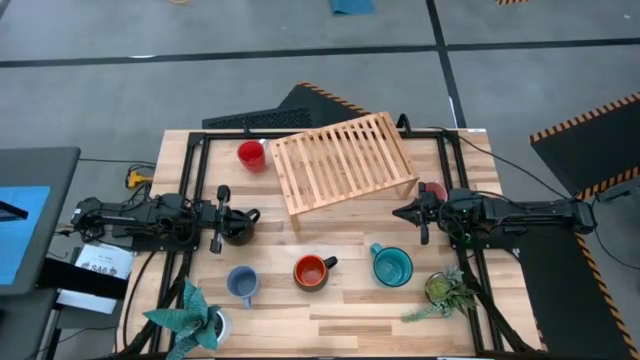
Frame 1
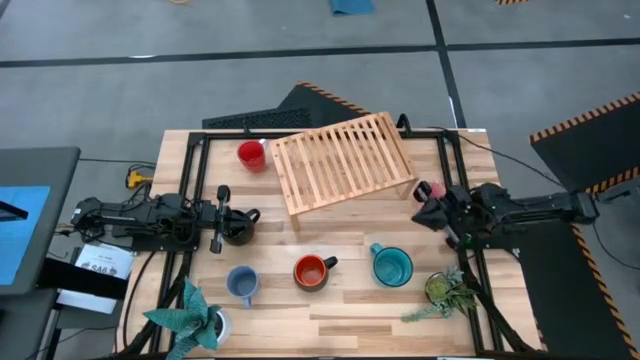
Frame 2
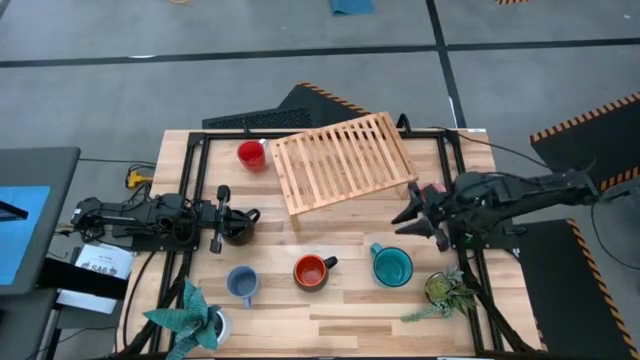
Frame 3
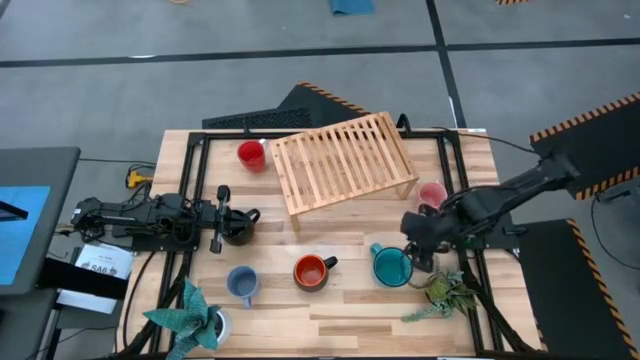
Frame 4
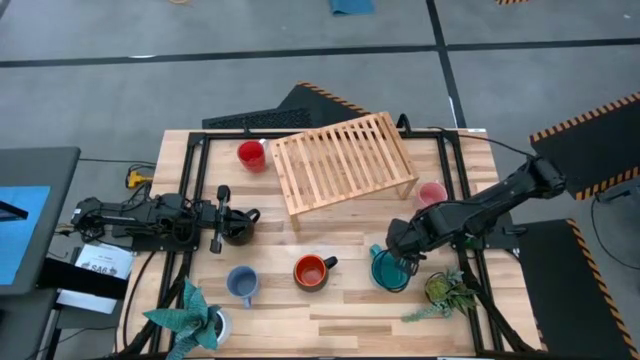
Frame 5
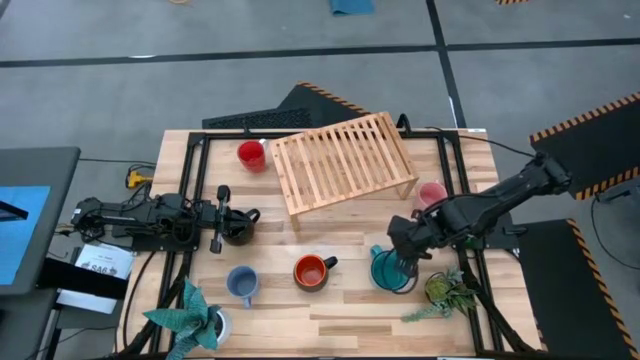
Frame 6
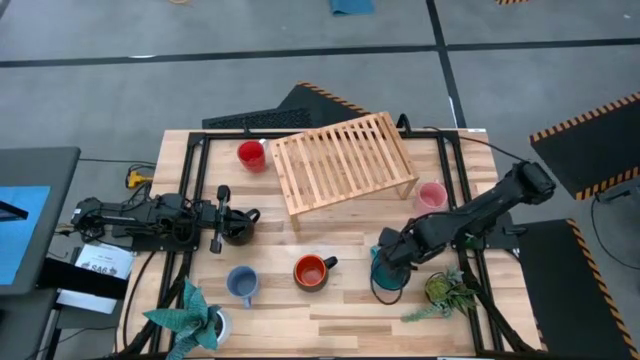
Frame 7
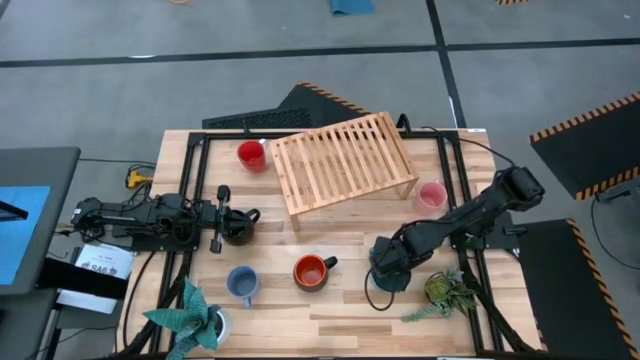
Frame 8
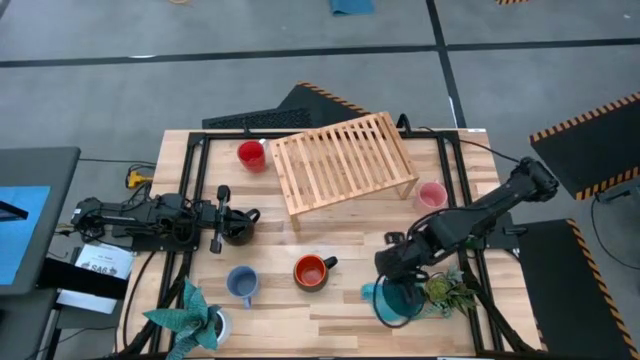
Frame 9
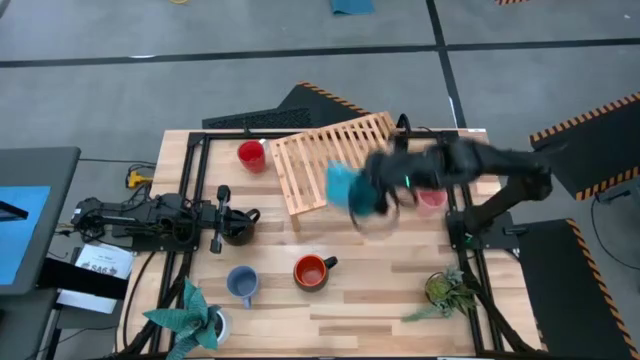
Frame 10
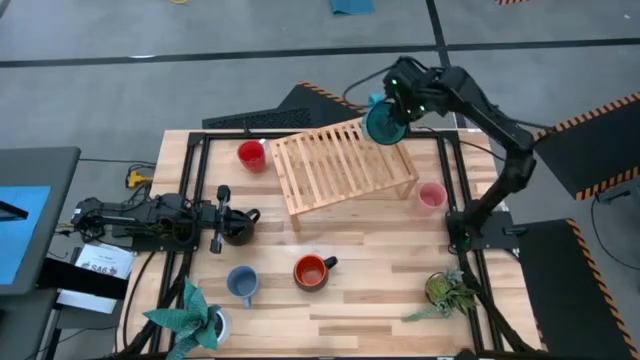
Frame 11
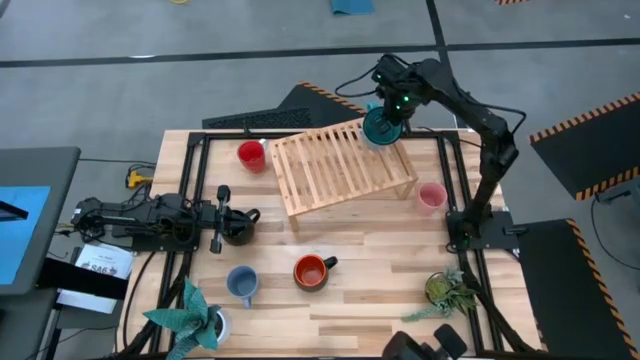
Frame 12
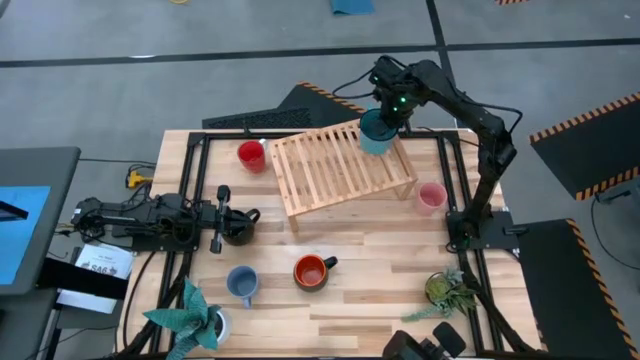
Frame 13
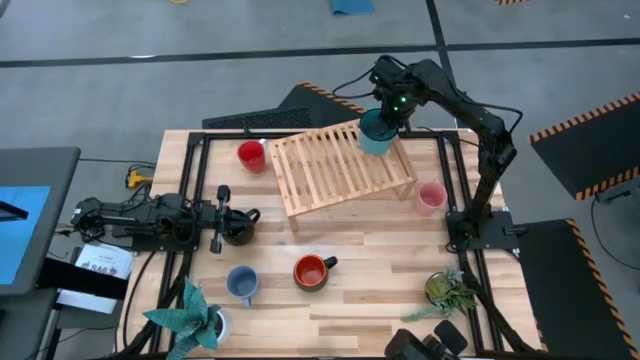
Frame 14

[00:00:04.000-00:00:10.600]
Task: Place coffee mugs
Put the light blue mug on the shelf

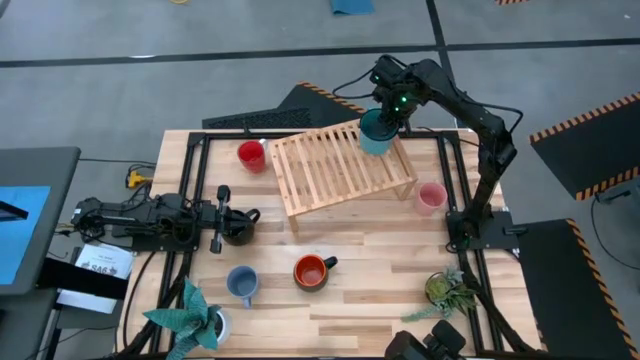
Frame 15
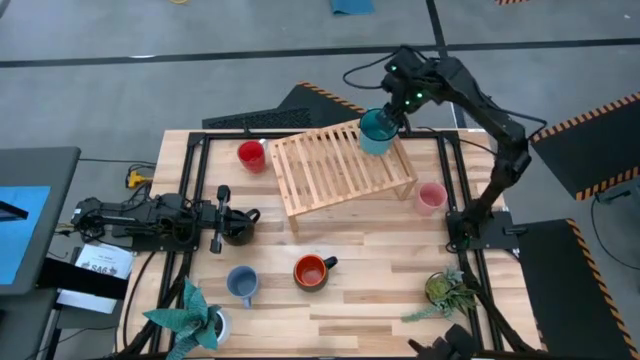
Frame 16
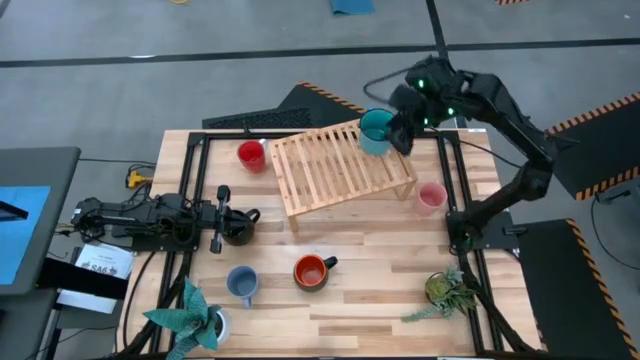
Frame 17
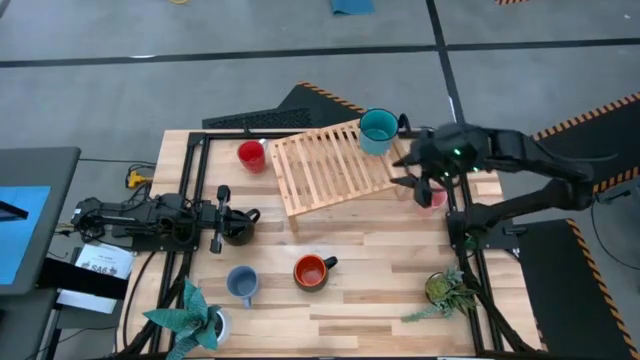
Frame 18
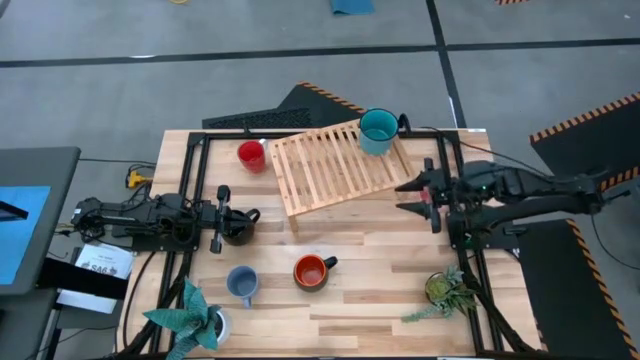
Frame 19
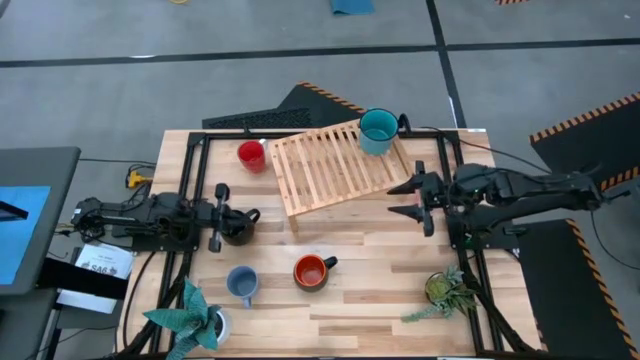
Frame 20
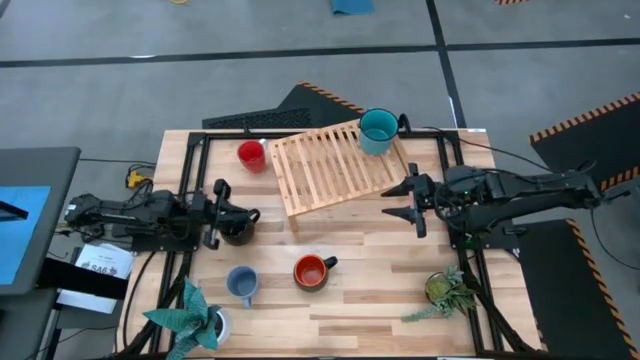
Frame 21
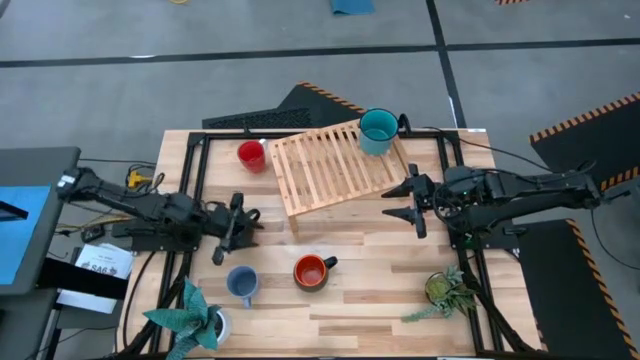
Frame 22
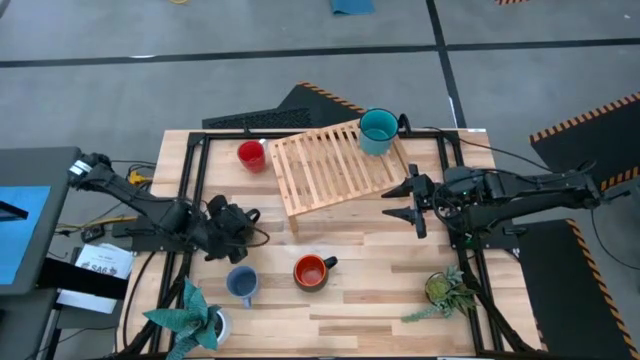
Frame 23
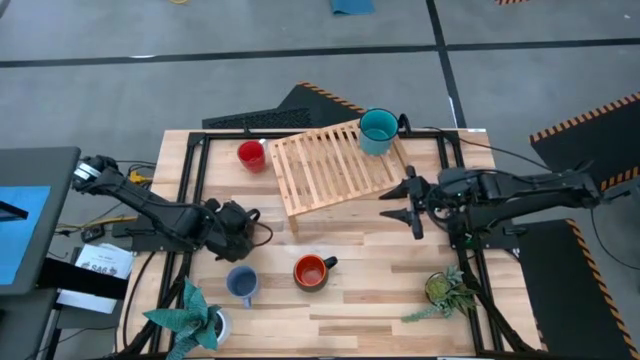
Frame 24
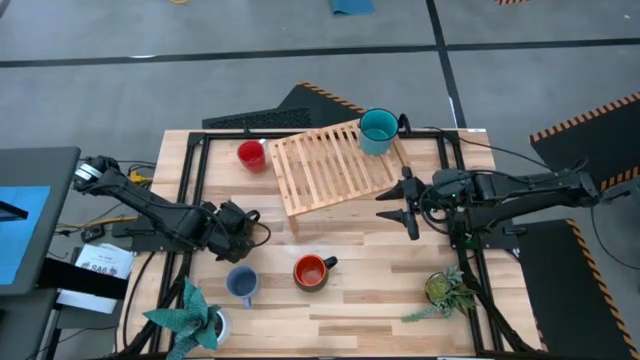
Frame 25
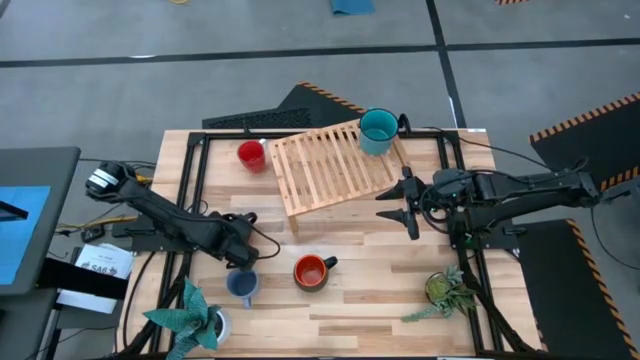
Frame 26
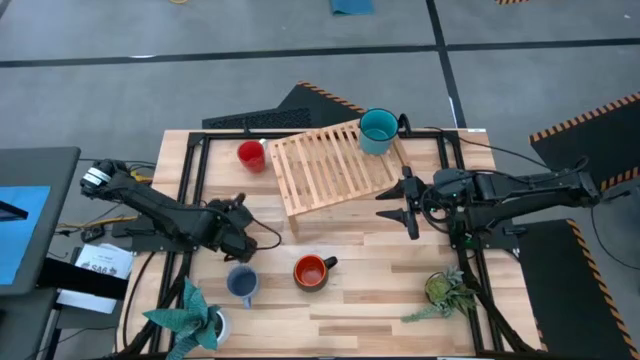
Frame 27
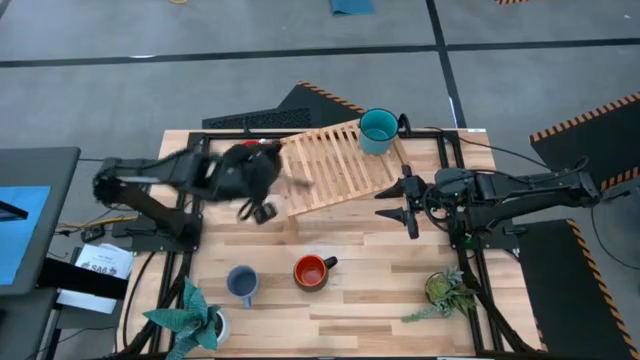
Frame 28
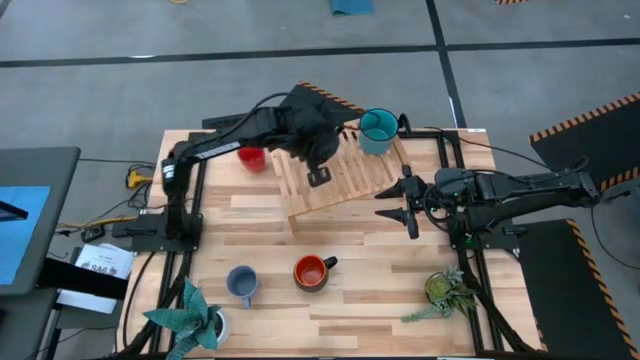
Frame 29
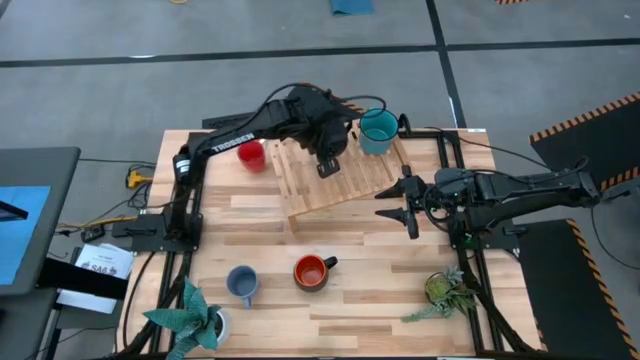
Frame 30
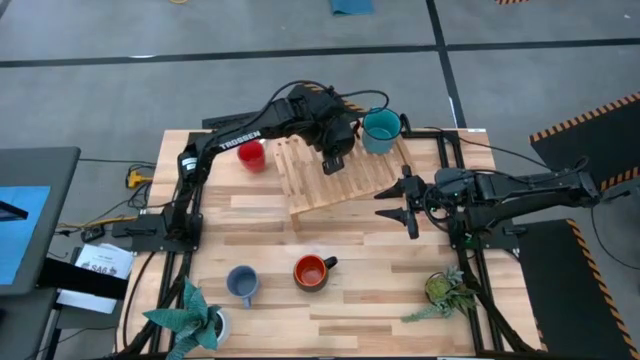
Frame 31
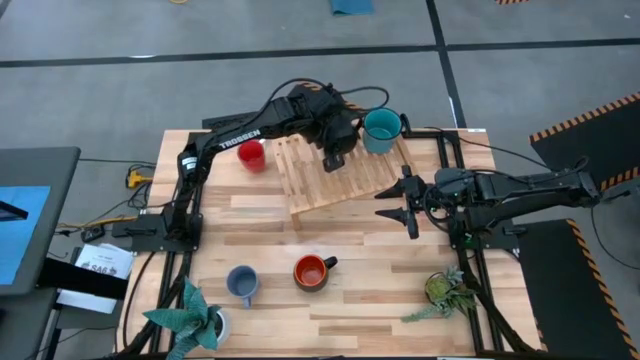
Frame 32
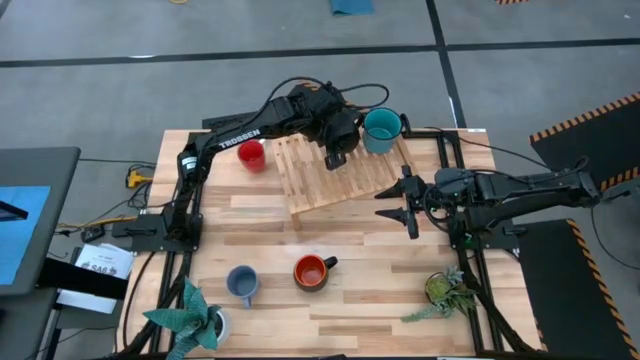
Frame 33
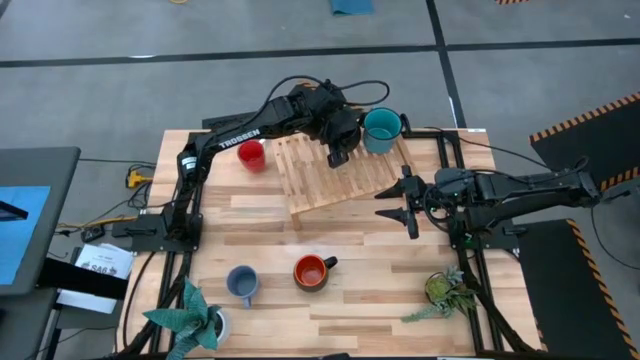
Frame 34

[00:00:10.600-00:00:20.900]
Put the black mug on the shelf

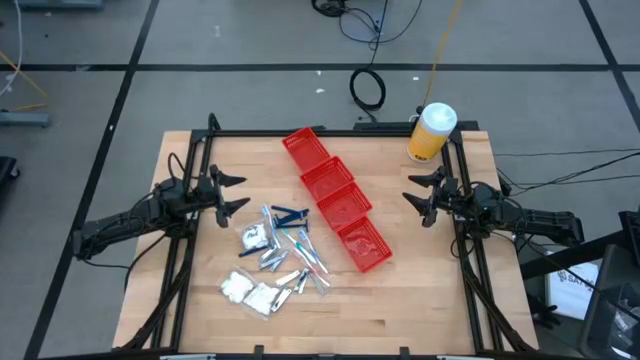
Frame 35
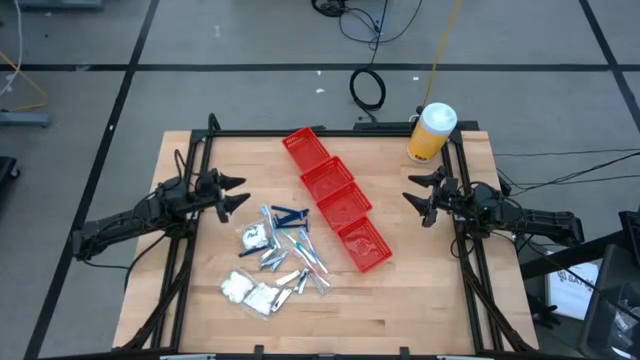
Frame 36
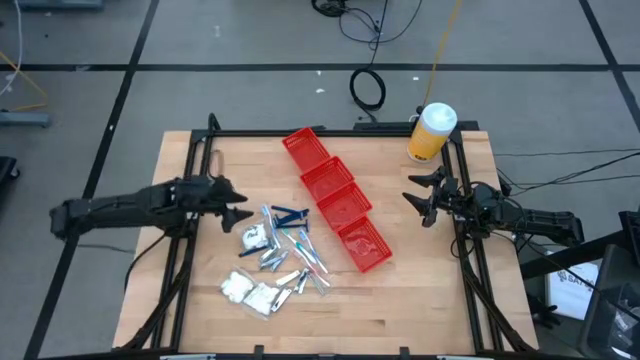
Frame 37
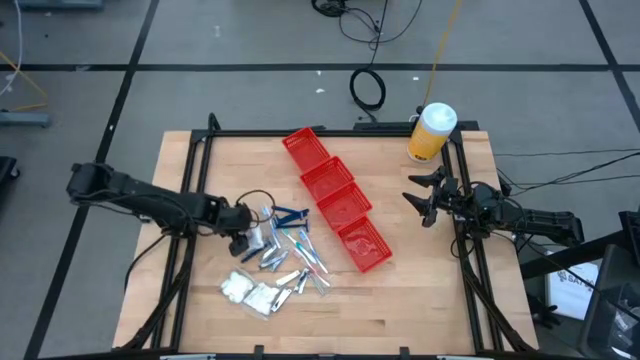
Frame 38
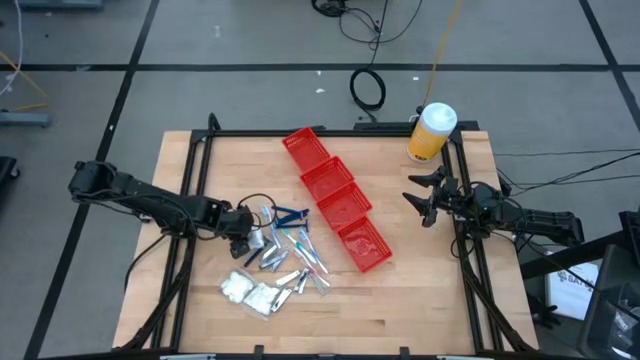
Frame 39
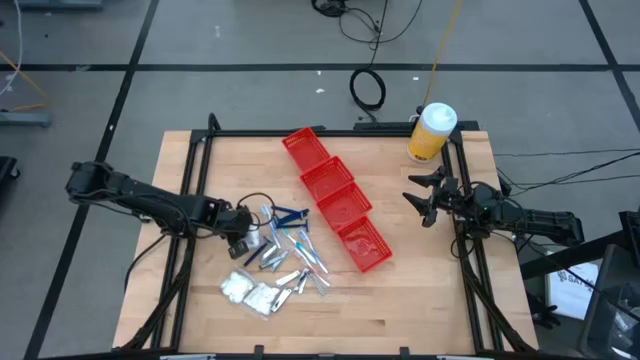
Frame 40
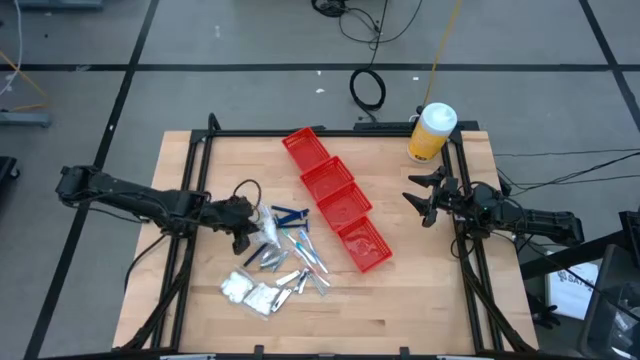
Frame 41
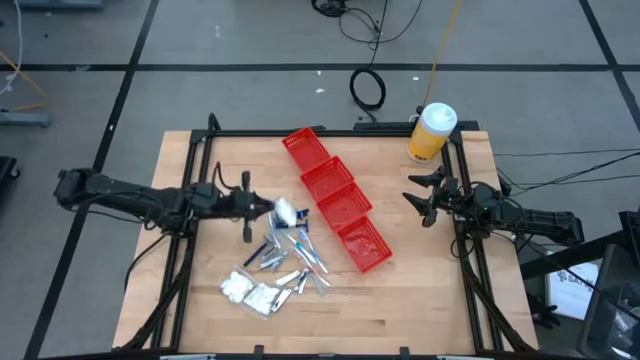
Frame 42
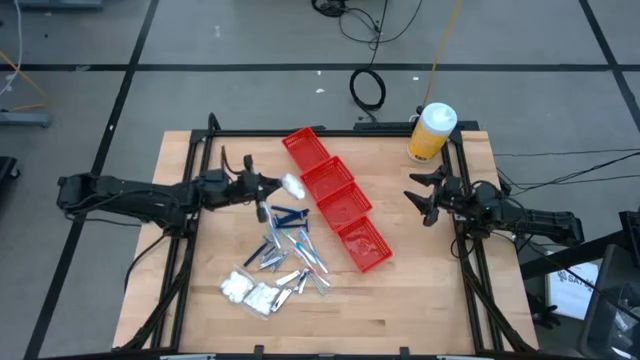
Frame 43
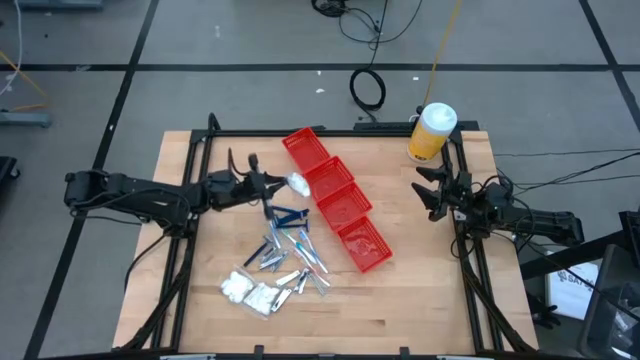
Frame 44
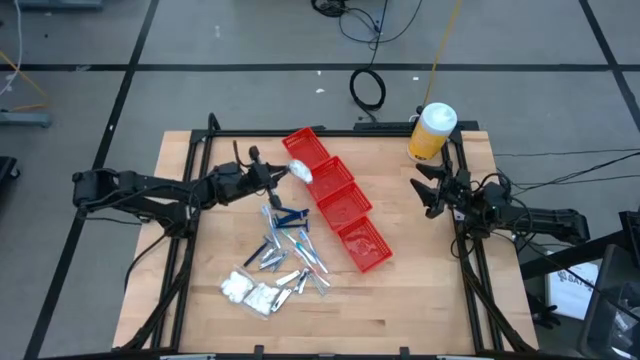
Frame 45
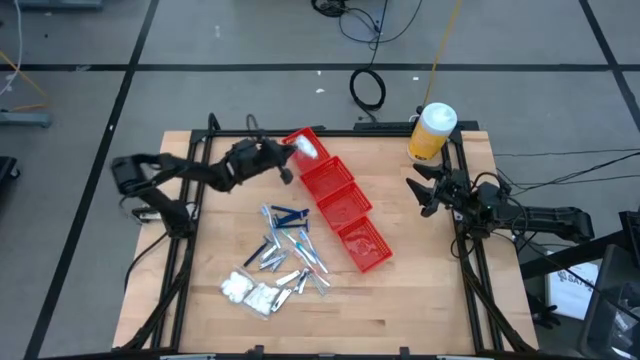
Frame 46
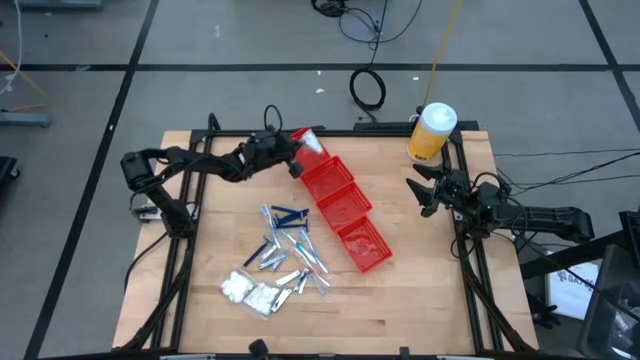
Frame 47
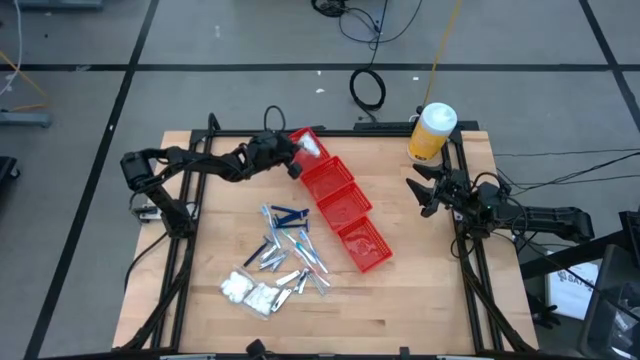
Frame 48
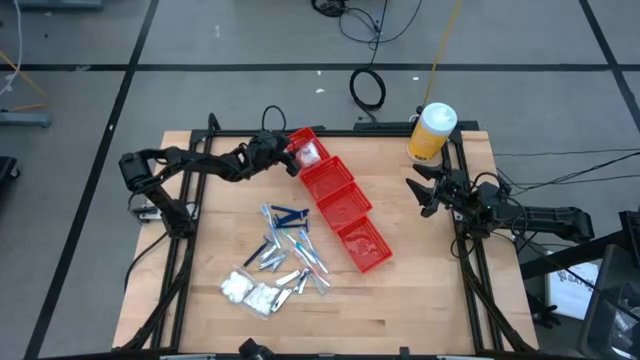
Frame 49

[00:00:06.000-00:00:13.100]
Task: Pick & Place Travel size toiletries
Put the top white cotton pack into the top red bin
